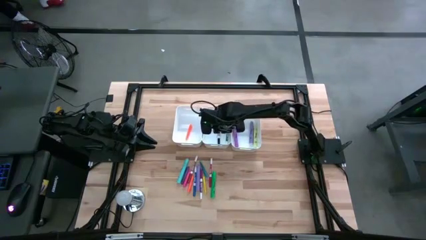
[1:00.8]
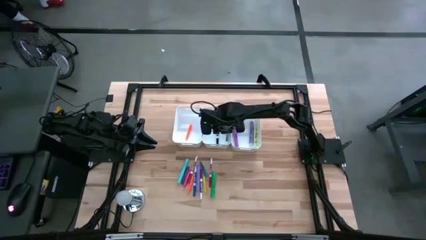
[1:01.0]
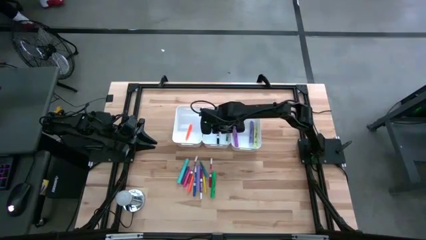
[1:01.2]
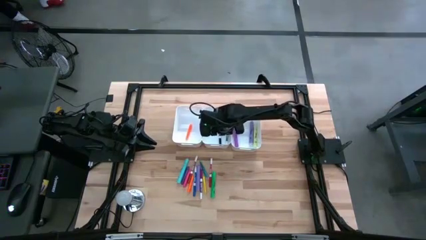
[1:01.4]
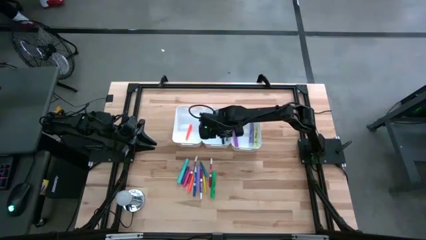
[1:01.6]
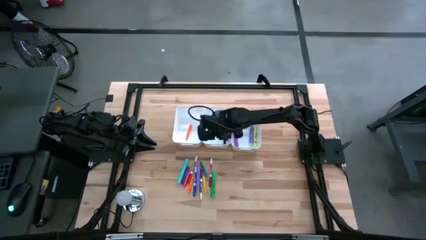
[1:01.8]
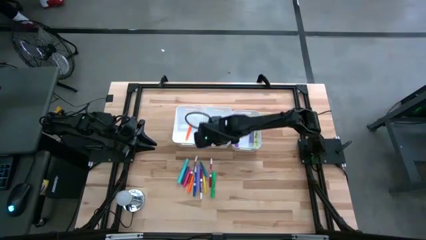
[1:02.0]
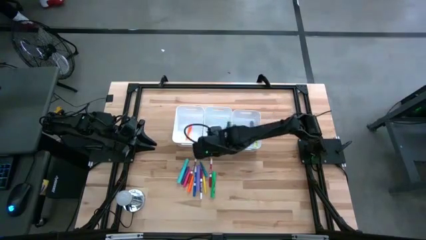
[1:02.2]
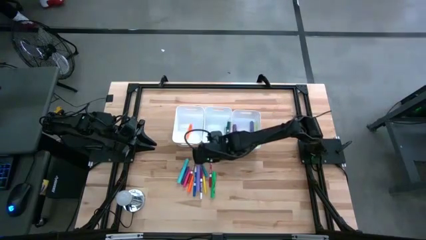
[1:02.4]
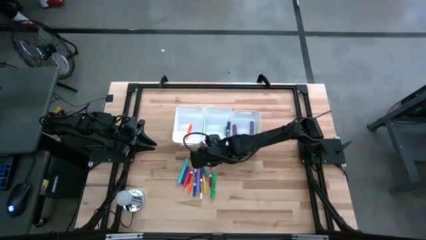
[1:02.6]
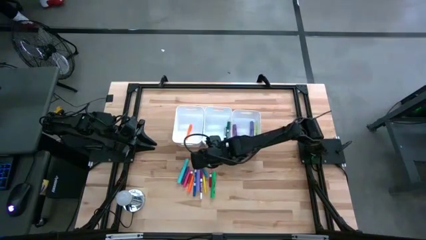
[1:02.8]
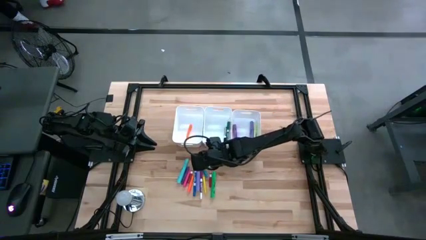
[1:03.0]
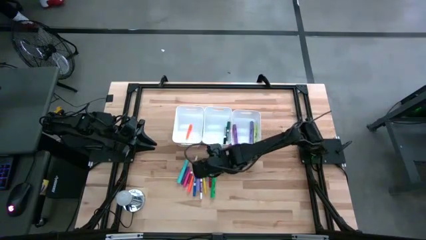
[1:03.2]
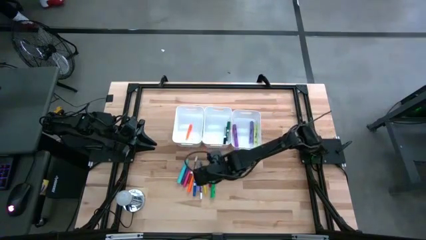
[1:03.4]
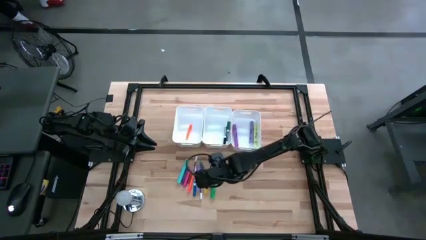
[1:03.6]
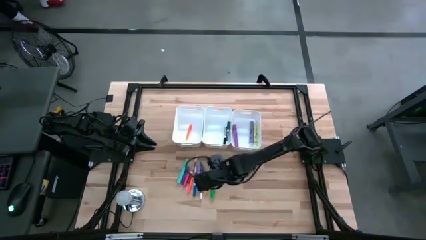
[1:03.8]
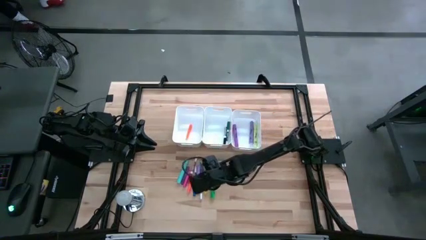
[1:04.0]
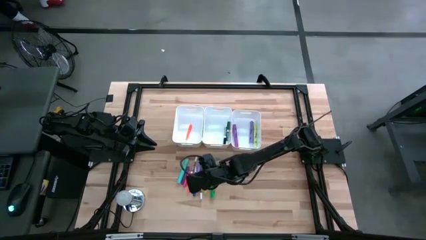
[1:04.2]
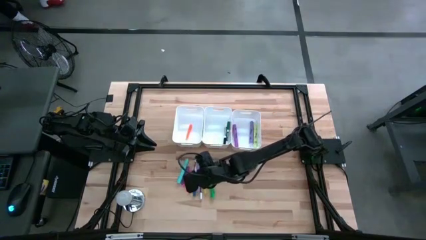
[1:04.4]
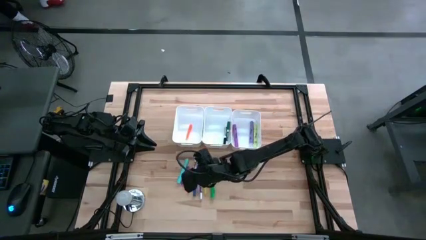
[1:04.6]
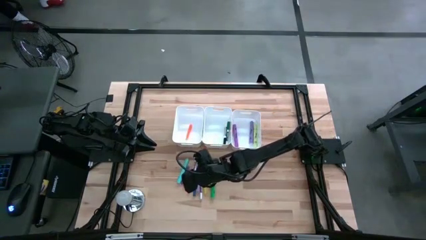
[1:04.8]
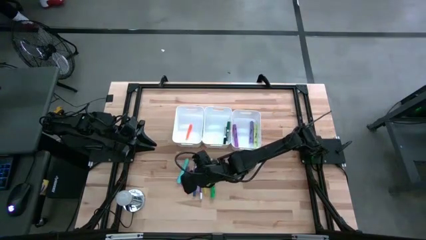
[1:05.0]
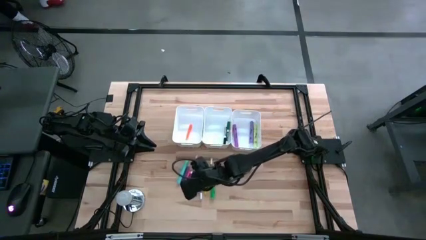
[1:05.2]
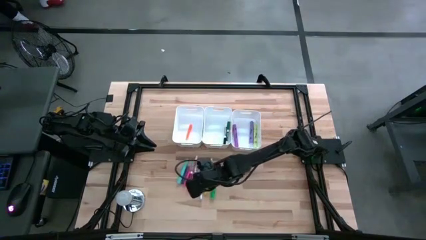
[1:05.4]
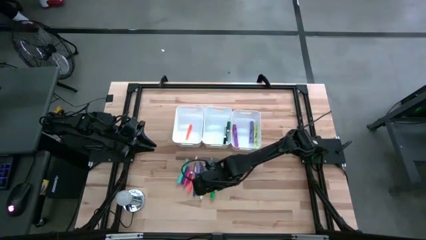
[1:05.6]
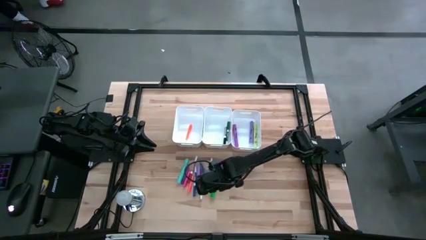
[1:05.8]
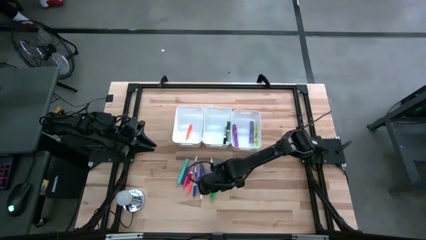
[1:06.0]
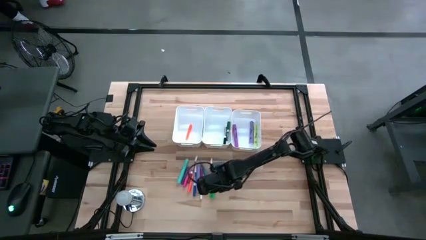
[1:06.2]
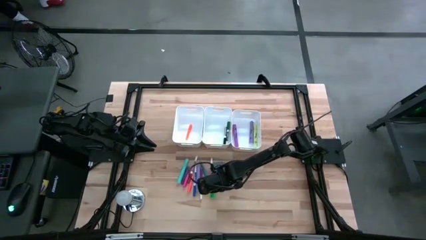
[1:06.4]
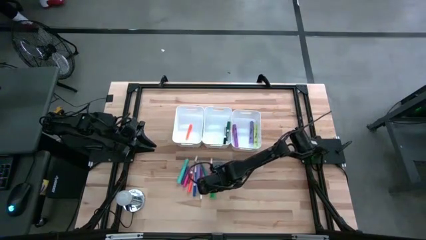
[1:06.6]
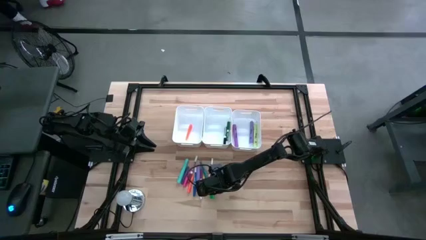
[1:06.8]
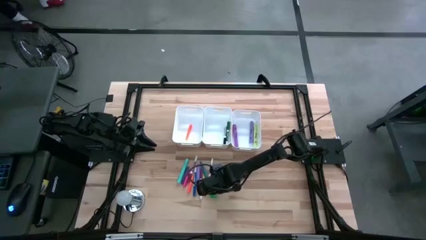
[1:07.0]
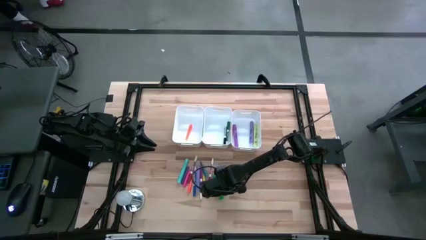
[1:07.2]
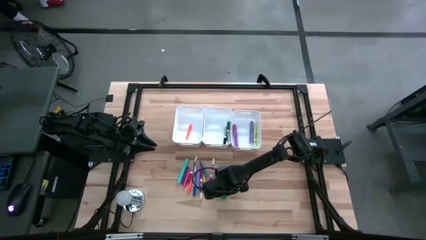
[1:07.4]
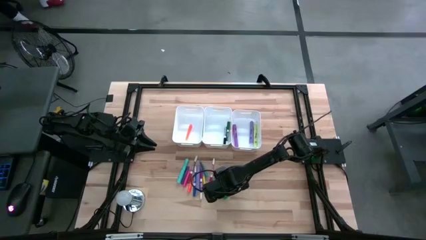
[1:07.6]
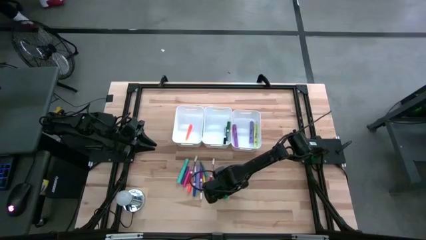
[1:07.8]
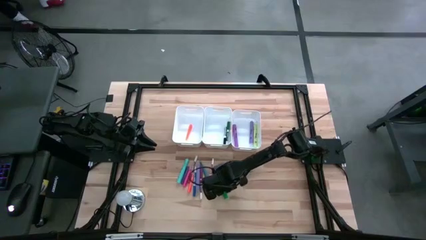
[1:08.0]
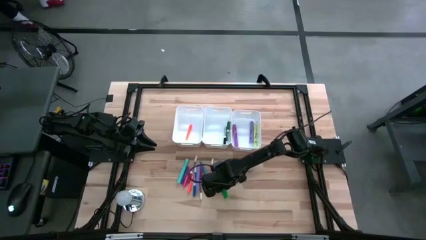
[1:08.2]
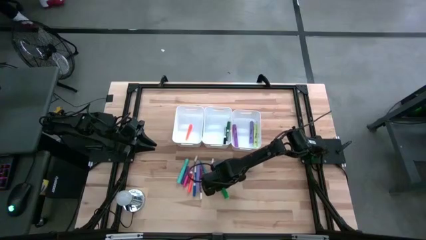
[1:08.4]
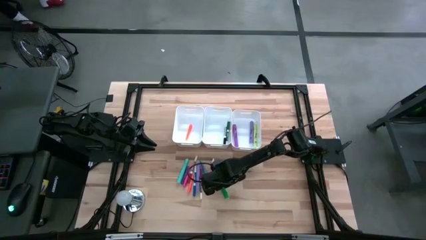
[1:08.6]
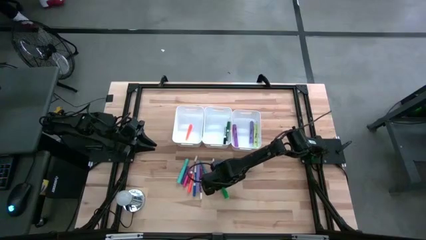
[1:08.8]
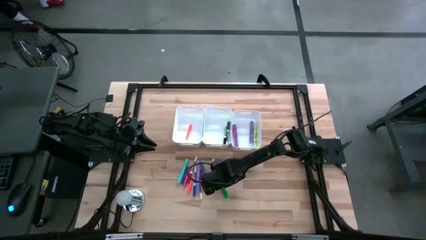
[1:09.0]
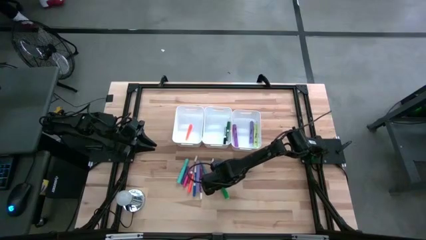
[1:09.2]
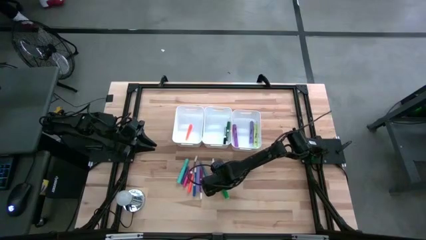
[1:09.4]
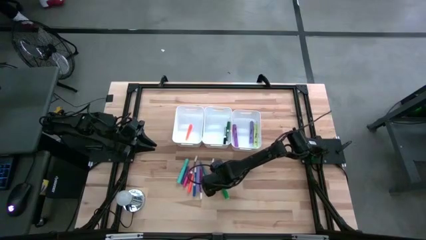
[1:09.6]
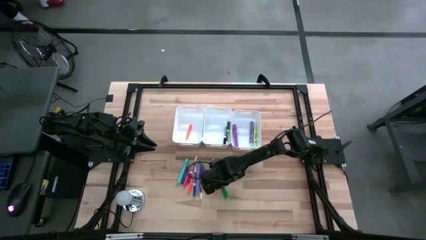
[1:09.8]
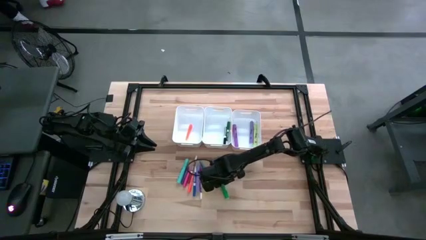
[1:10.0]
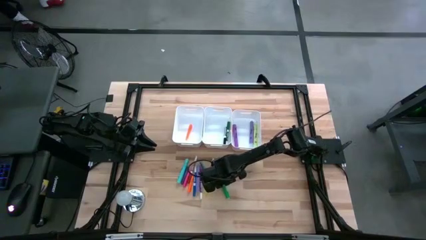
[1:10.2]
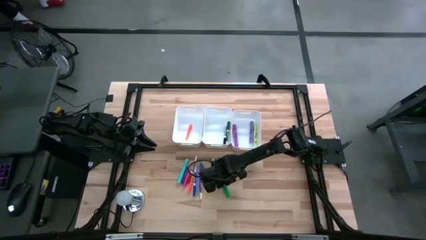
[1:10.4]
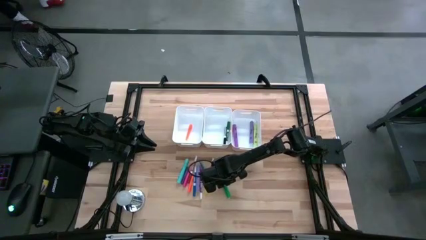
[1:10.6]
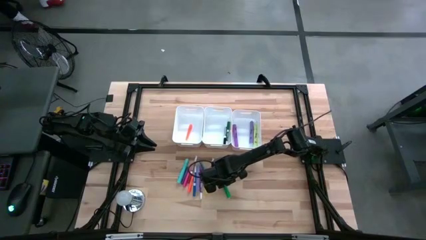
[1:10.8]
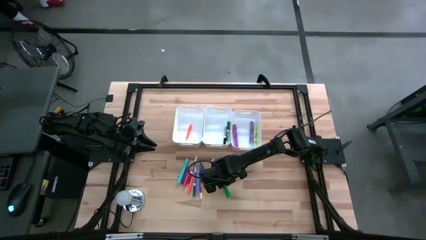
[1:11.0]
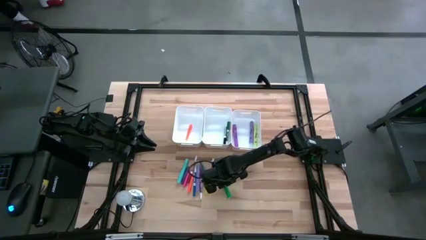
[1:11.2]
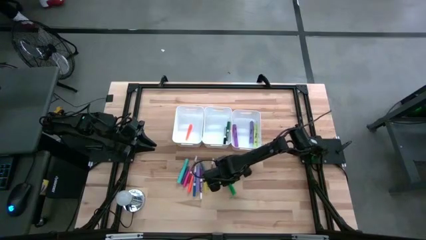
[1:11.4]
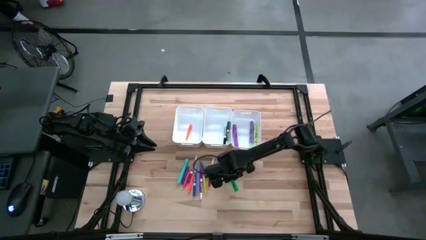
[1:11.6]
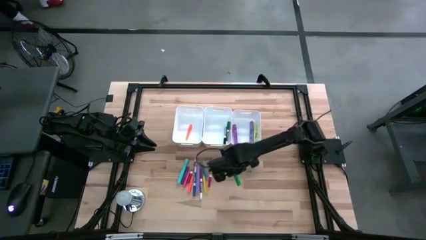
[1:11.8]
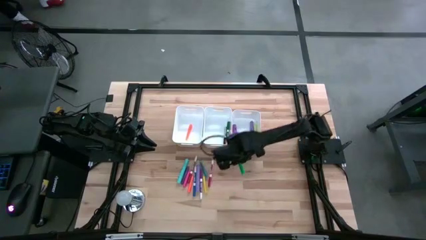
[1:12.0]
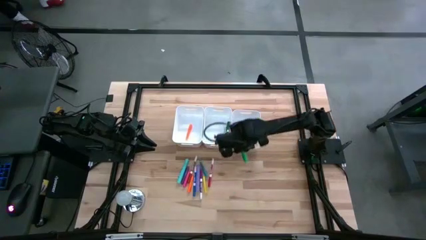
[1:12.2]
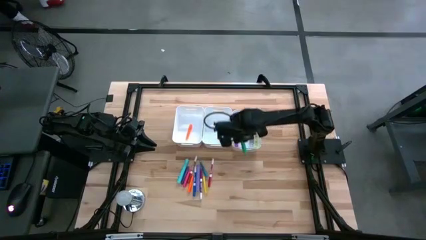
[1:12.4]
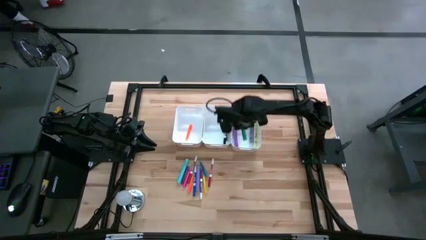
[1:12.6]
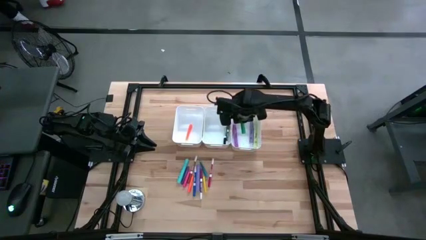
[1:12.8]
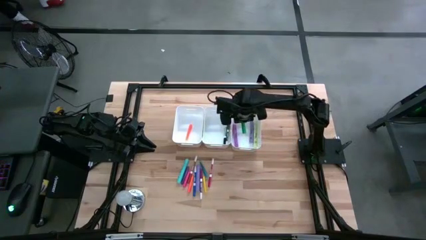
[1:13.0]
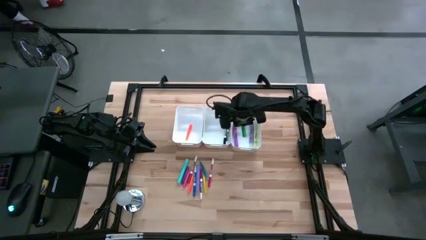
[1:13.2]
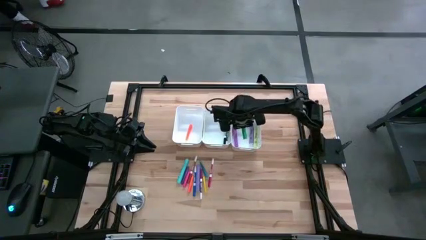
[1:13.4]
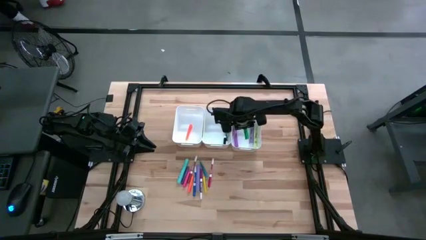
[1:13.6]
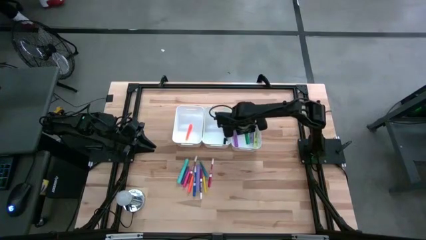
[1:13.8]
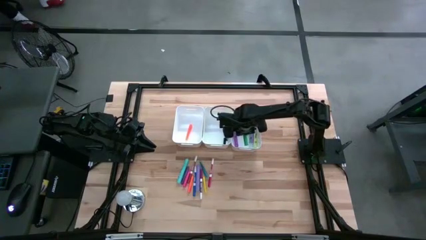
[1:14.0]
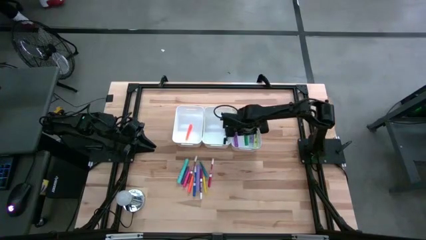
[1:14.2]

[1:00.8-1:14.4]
Task: Pick & Place Markers
Put the green highlighter into the right white bin

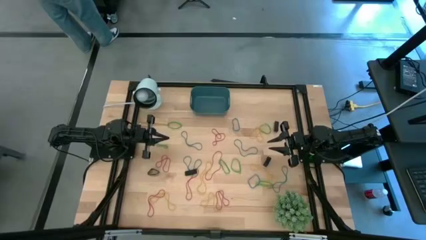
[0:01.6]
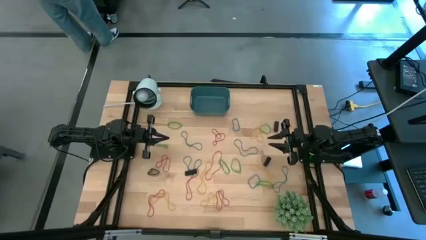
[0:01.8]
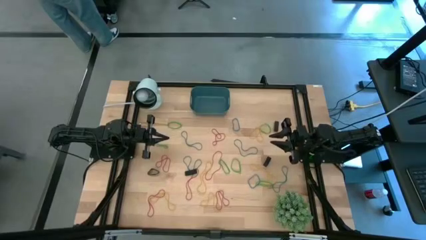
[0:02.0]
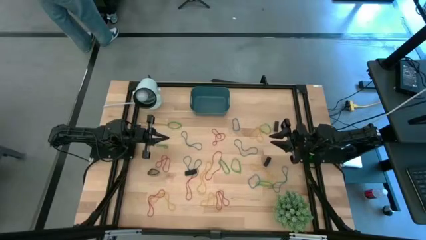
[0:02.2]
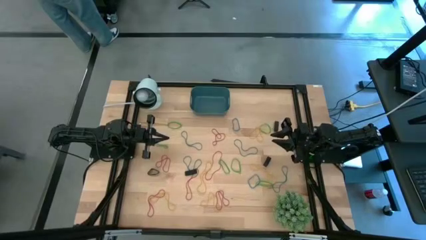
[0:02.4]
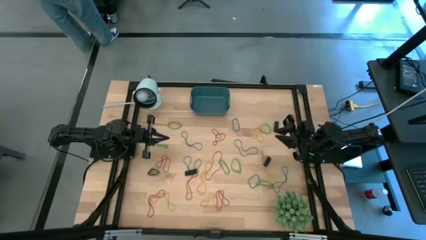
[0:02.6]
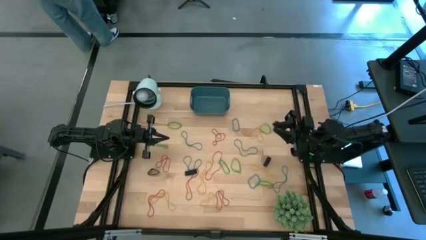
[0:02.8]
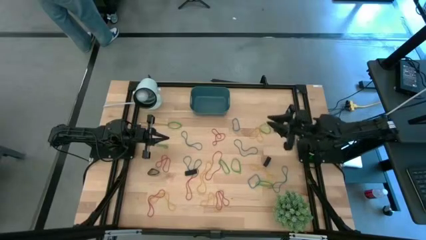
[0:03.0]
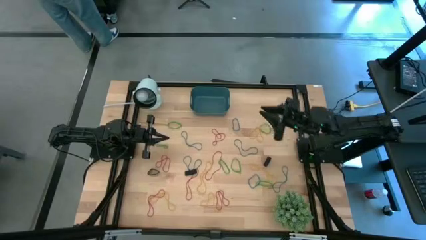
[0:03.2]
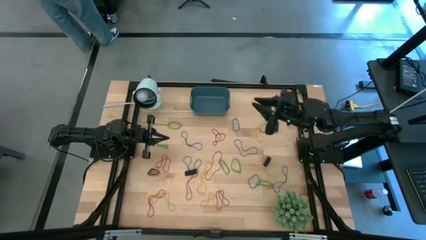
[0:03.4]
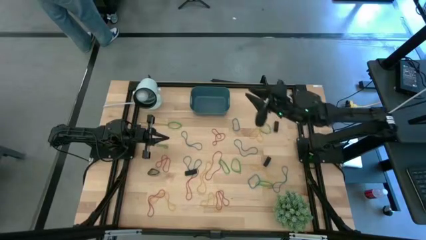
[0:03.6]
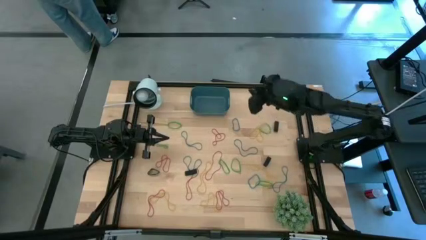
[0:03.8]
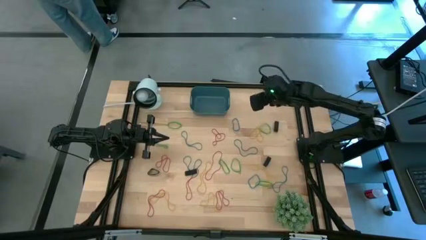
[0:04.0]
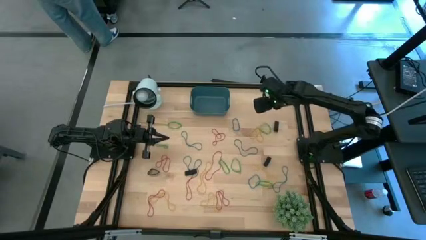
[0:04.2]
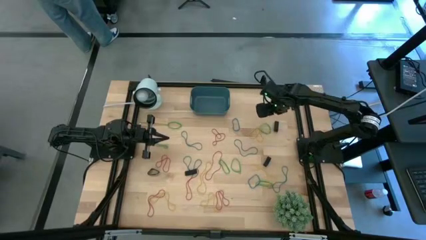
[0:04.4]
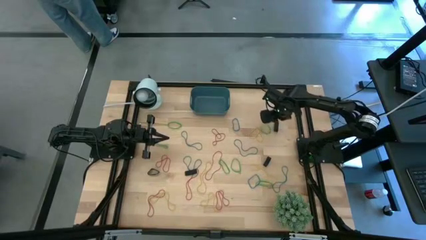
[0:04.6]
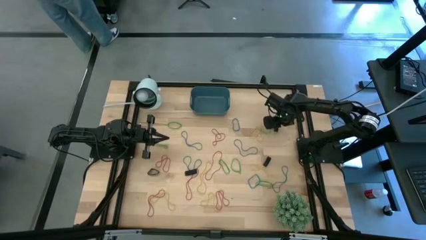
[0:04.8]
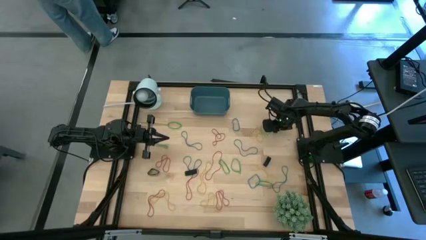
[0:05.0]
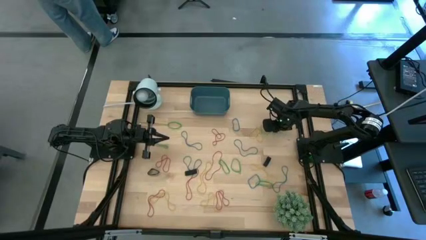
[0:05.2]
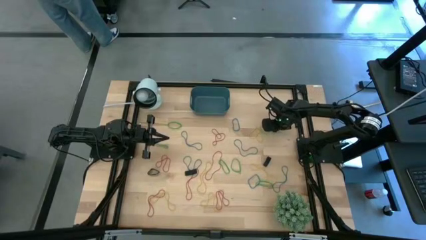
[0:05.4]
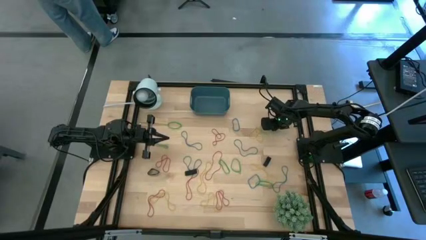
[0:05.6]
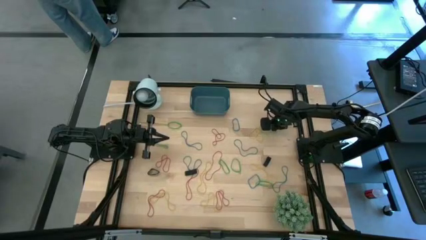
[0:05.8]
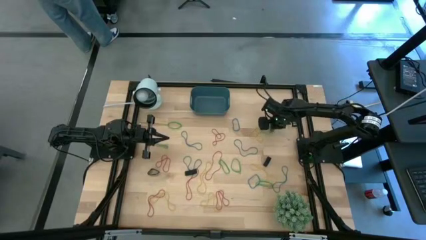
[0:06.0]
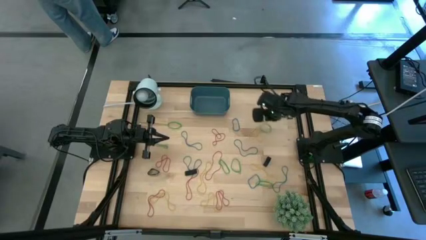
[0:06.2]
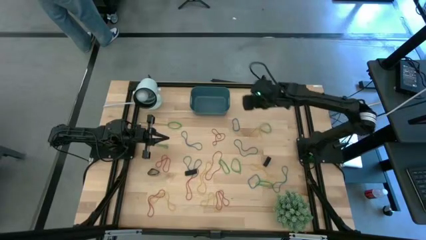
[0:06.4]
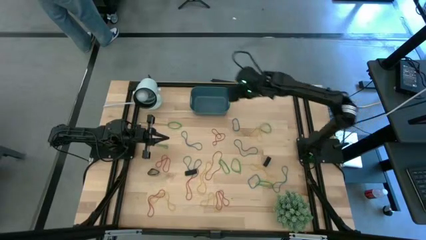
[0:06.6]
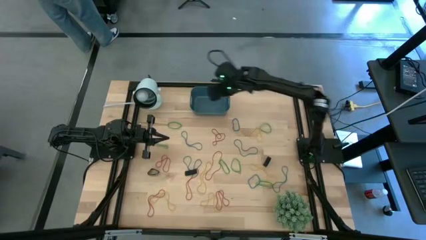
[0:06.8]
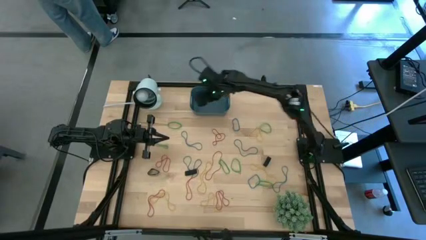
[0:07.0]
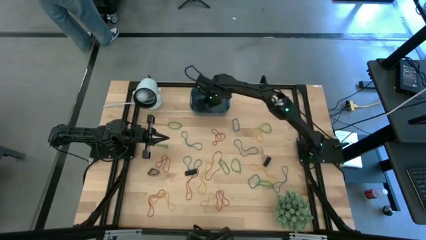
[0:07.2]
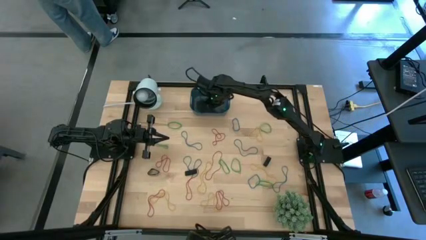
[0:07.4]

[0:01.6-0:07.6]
Task: Pick and place rubber bands into bin
Put the black rubber band into the blue bin
